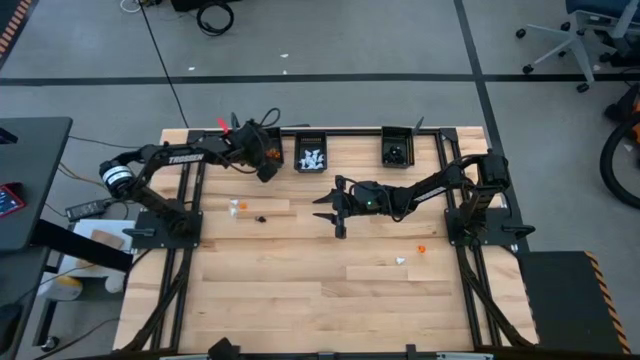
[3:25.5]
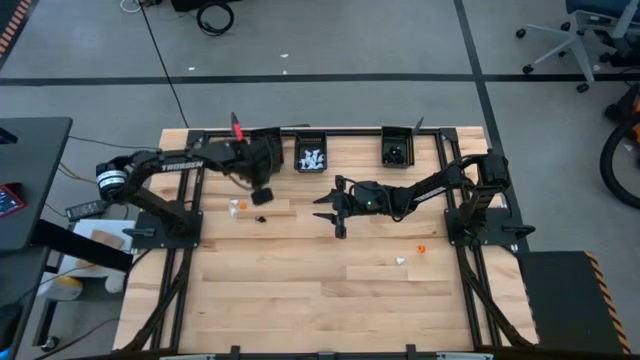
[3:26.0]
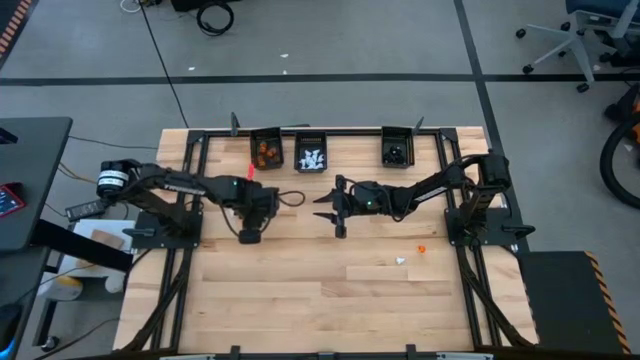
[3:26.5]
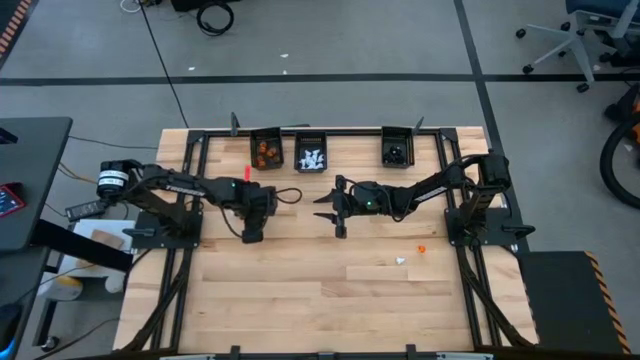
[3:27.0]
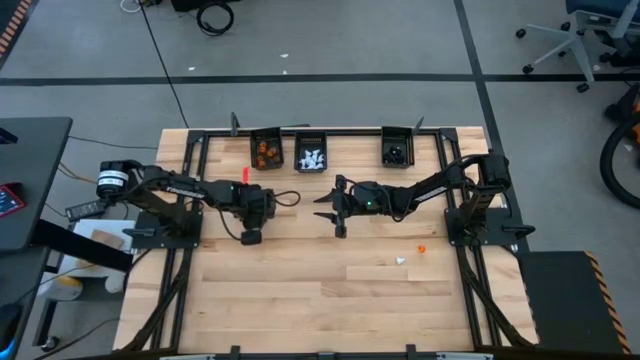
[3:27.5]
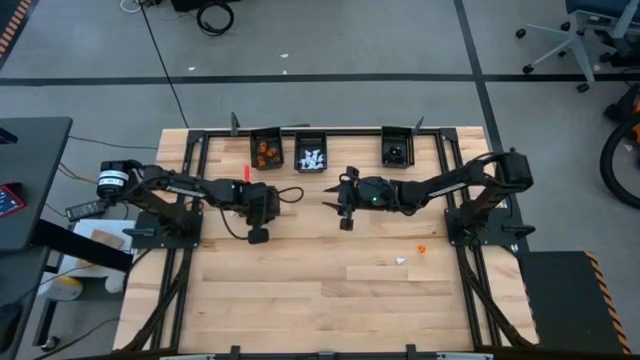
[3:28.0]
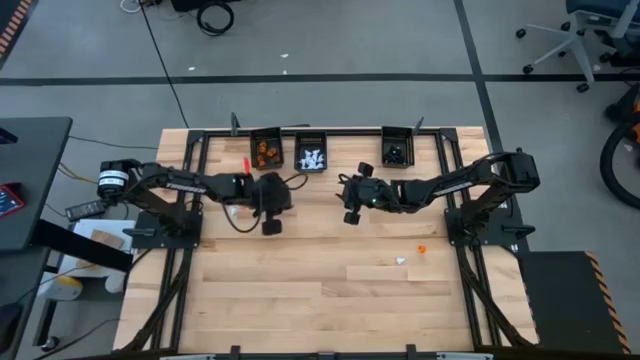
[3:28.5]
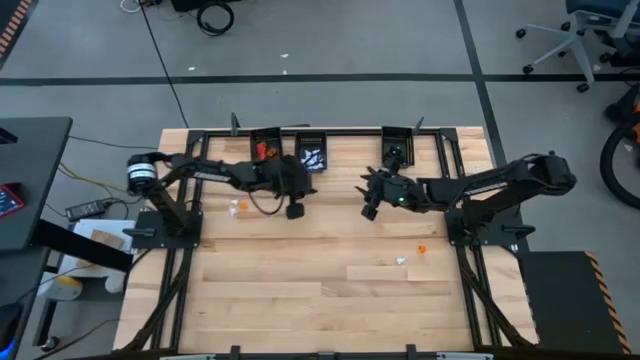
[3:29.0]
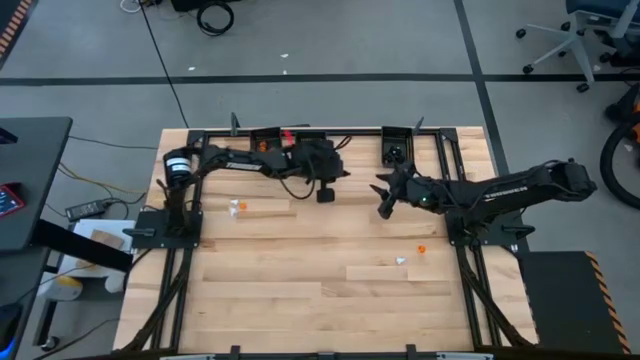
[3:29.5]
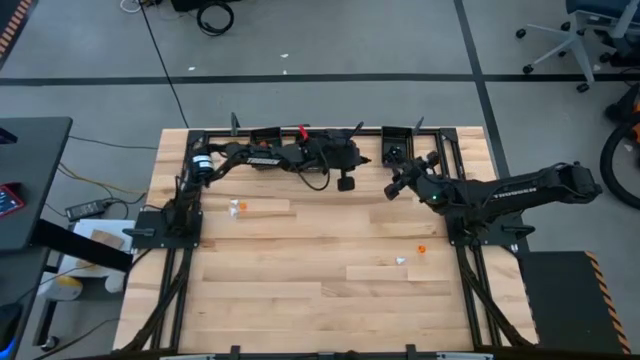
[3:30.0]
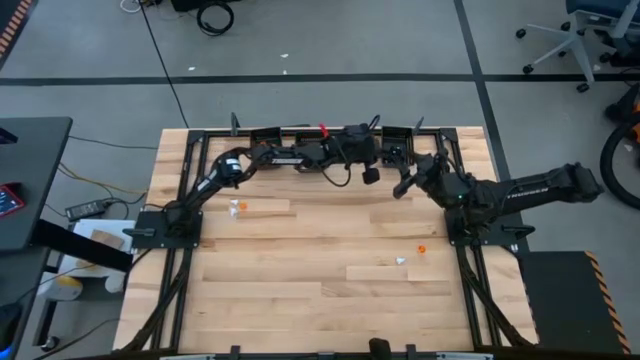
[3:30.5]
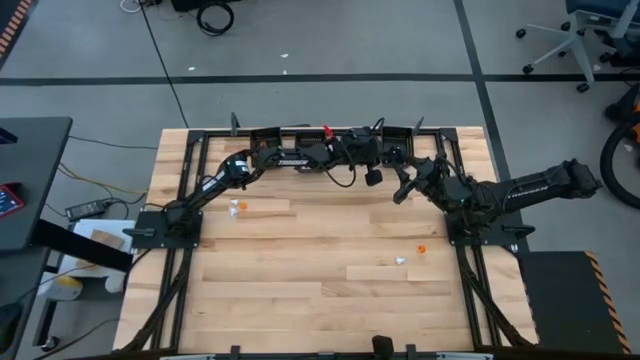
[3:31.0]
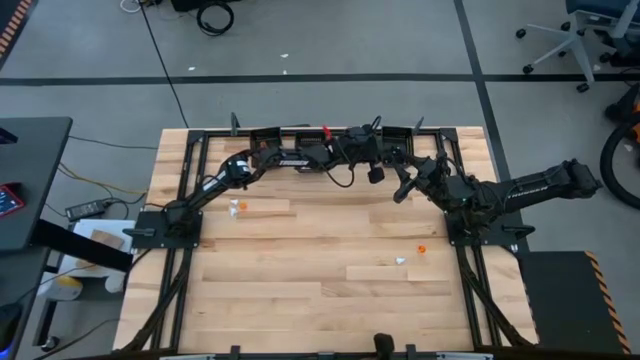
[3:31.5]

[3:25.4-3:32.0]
Task: Sort Halloween decoration
Put the black voodoo toy into the right black bin

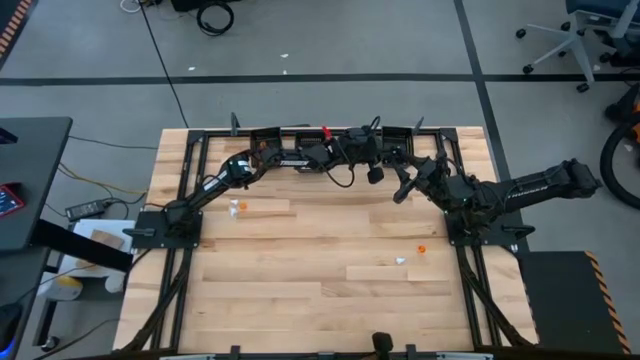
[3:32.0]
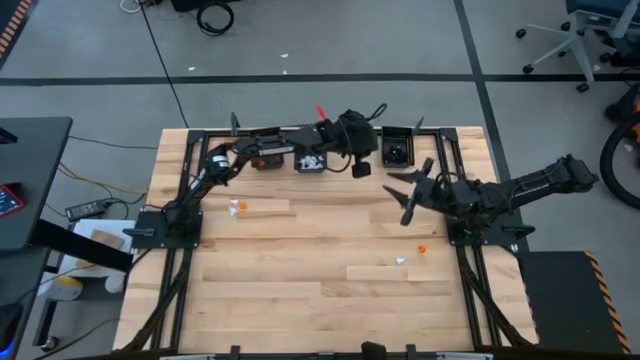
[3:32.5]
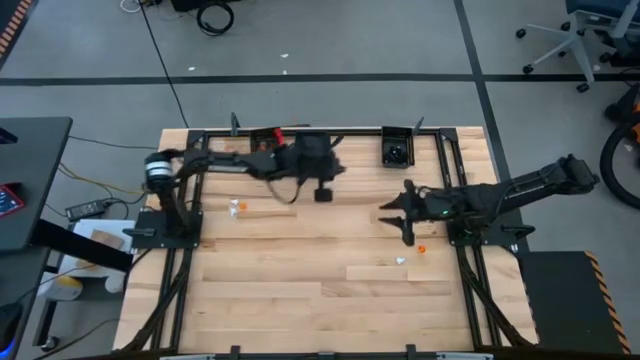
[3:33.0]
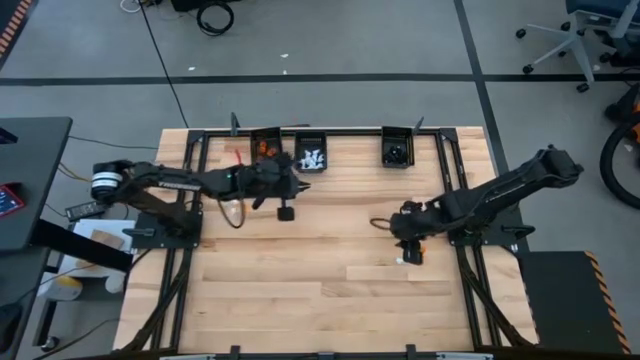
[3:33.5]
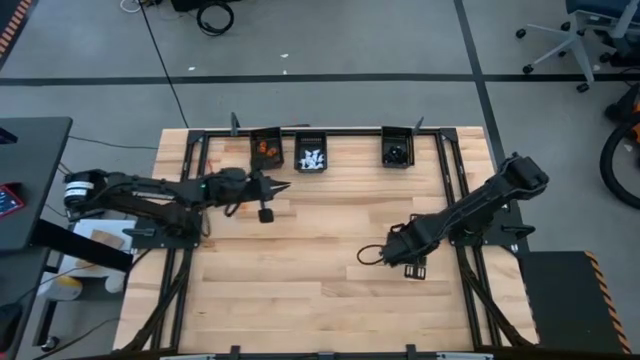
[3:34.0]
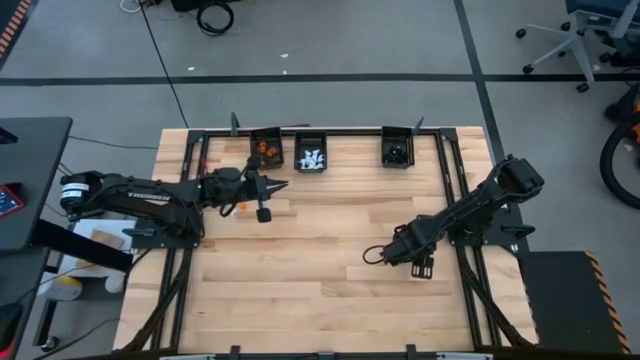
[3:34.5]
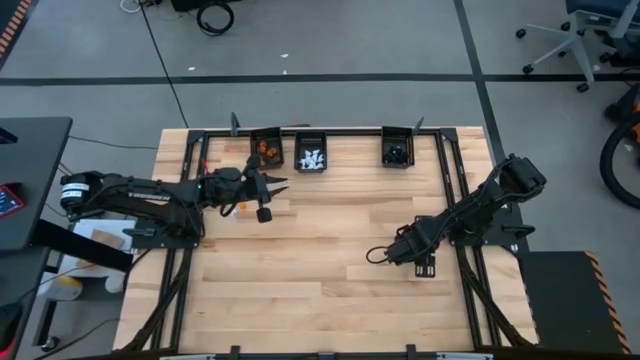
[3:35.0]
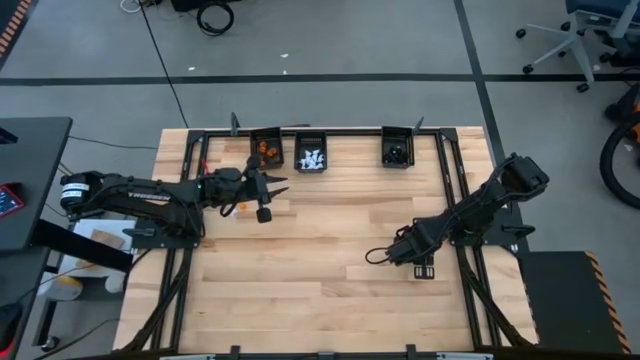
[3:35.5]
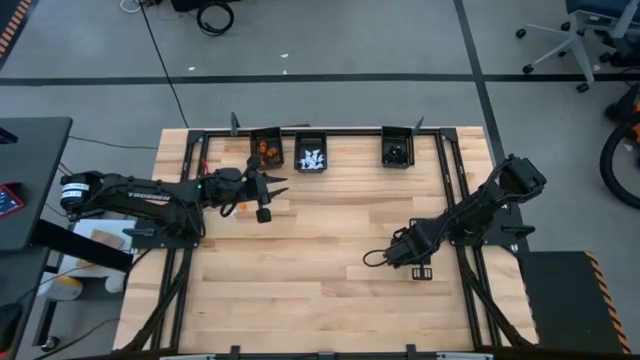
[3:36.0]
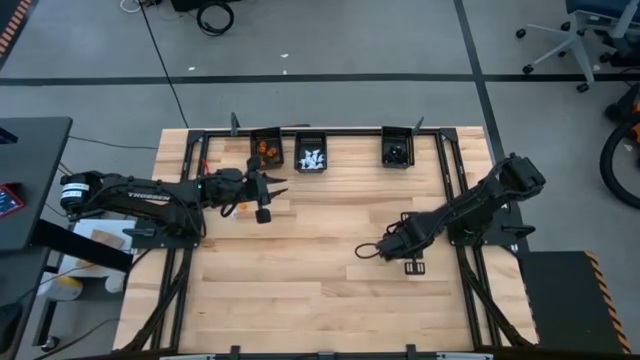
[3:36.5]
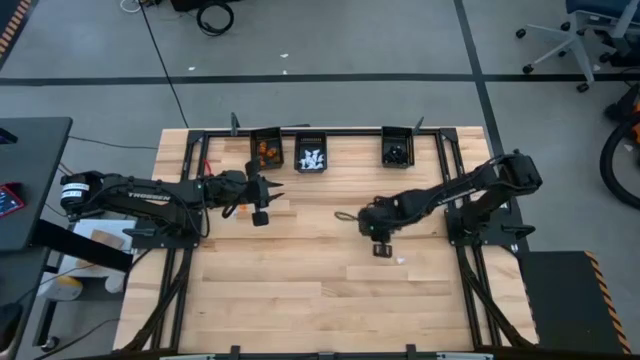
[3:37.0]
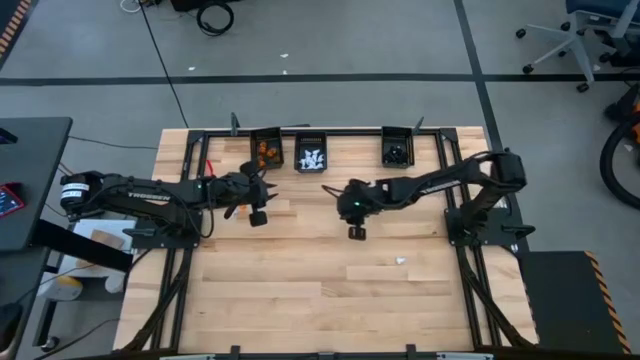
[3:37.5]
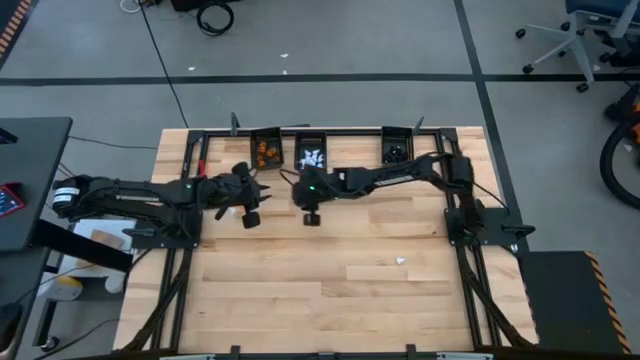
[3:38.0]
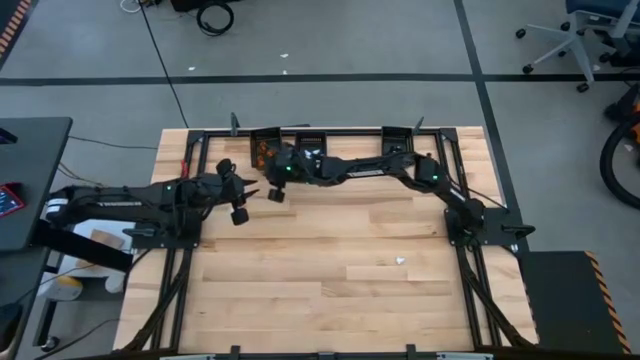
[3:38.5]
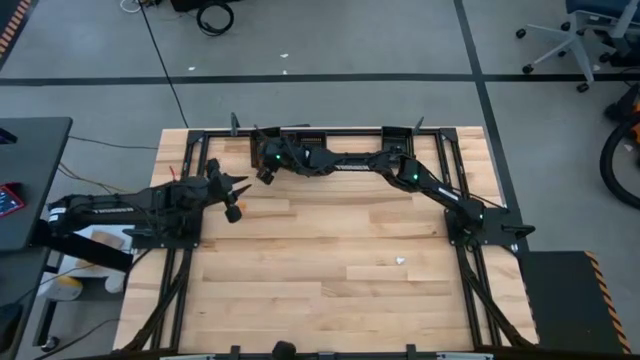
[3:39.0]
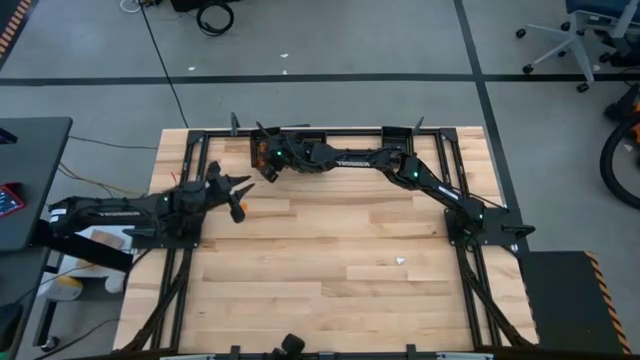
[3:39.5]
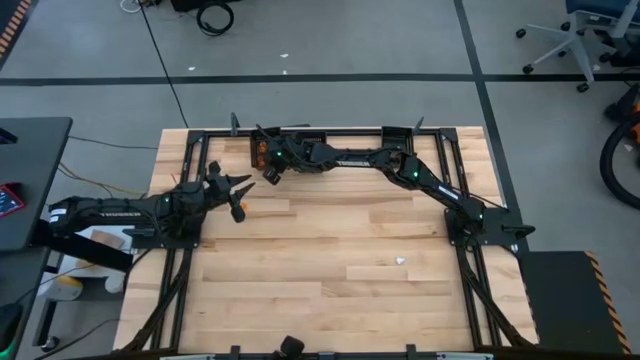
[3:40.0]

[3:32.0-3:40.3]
Put the orange pumpkin toy into the left black bin

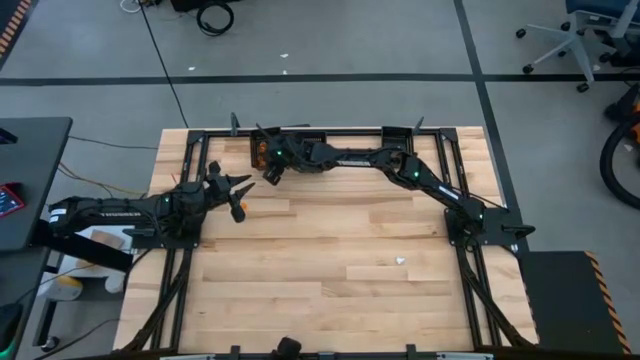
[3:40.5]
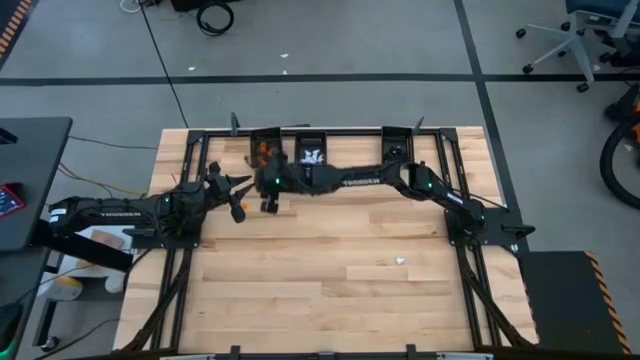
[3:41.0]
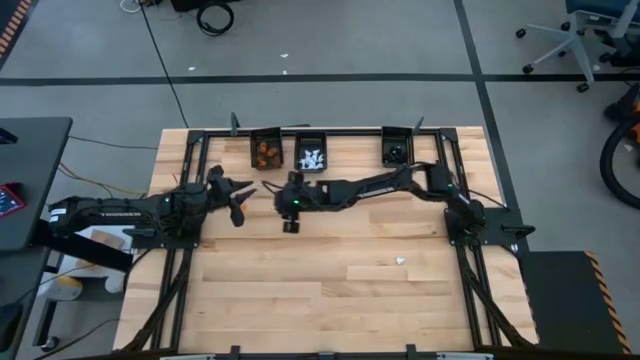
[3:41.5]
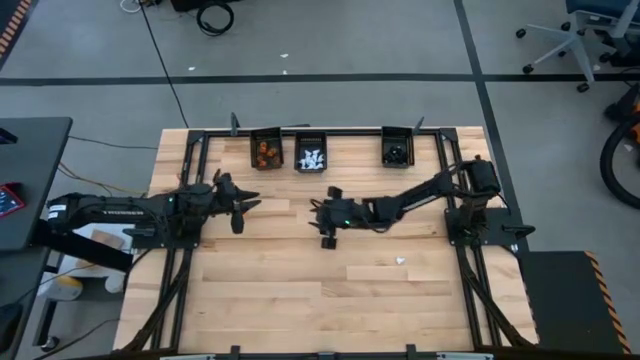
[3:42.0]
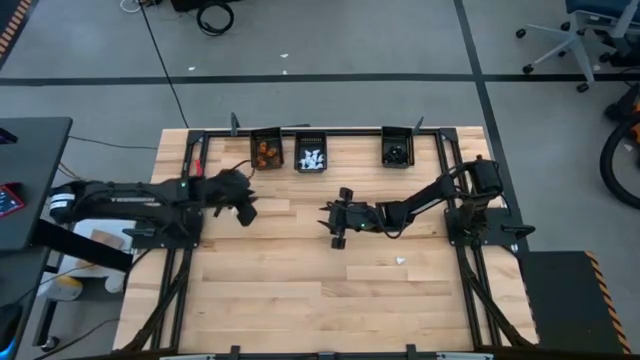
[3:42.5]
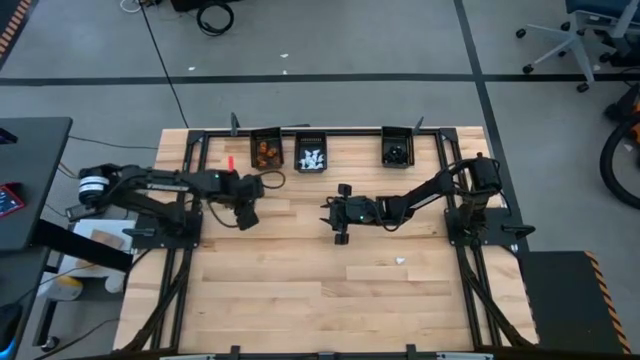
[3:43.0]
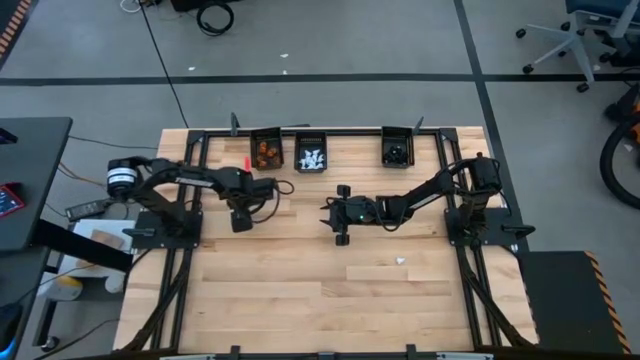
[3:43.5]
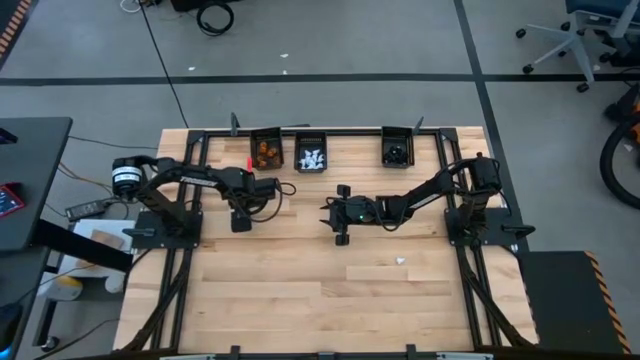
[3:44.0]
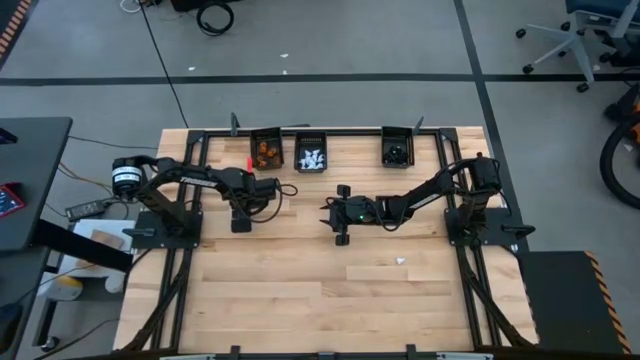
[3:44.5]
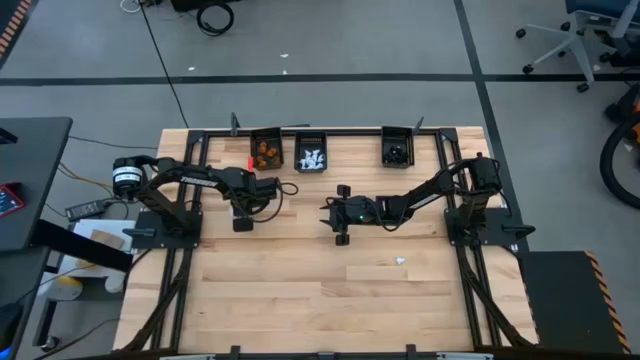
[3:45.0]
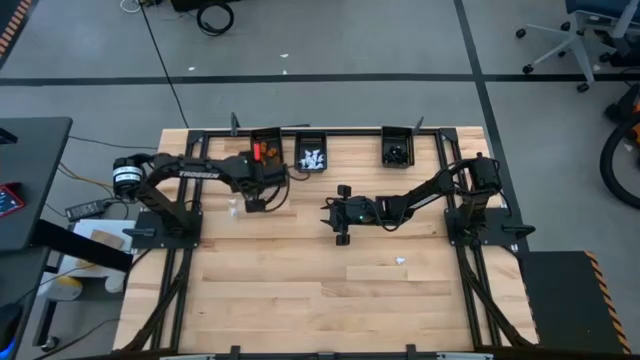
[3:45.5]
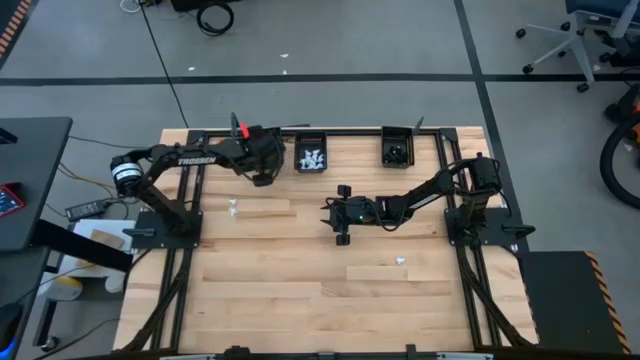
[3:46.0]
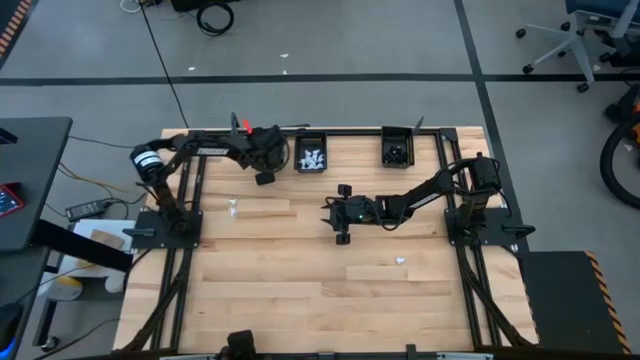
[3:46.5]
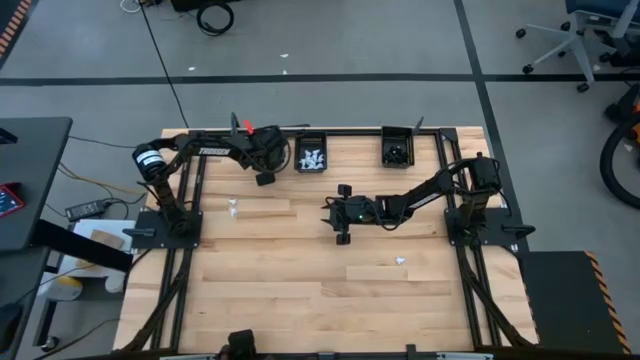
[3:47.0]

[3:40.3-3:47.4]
Put the orange pumpkin toy into the left black bin
